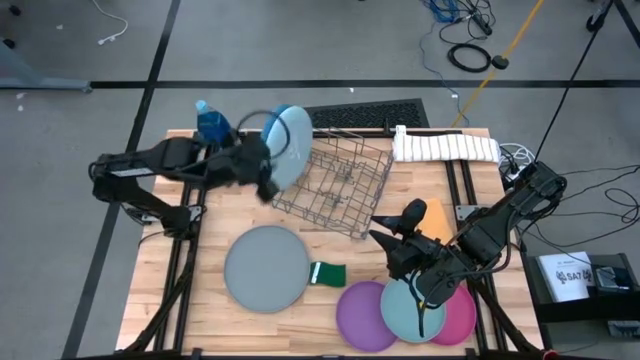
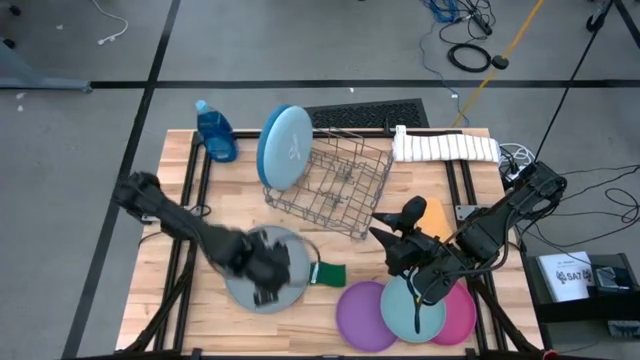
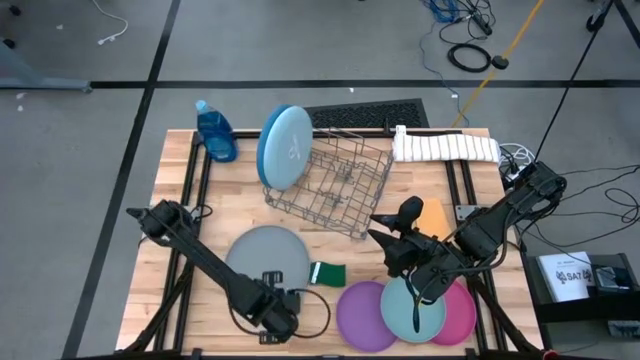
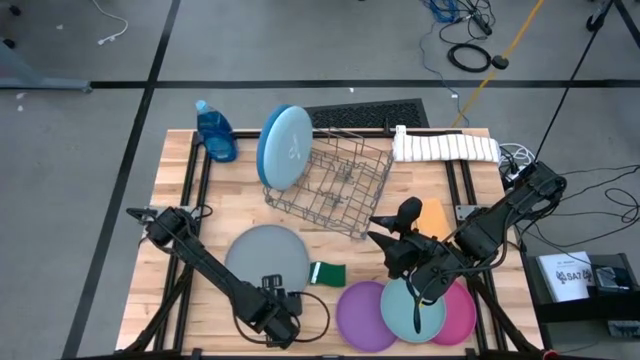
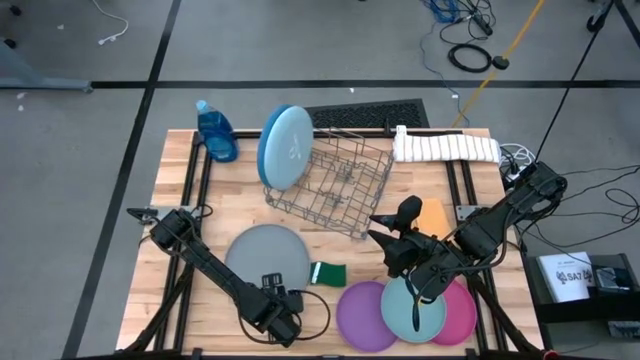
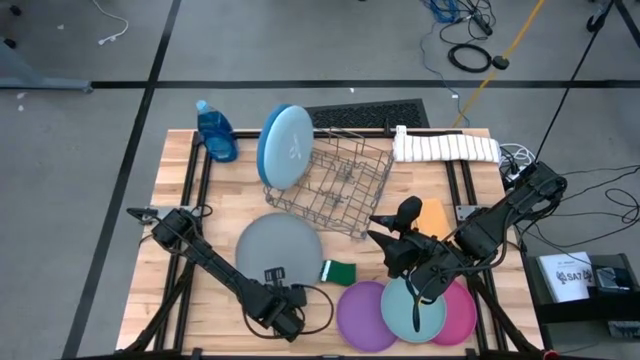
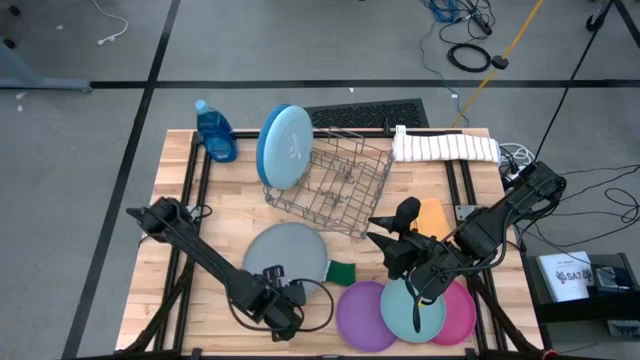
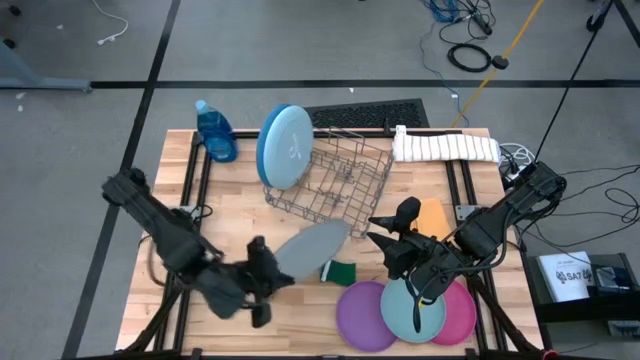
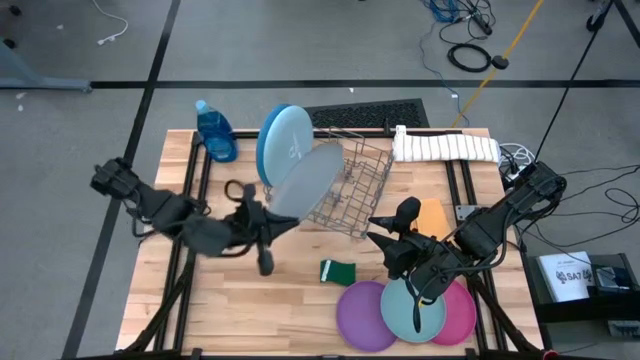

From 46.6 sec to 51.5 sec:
Task: Sort dishes
Put the grey plate in the dish rack

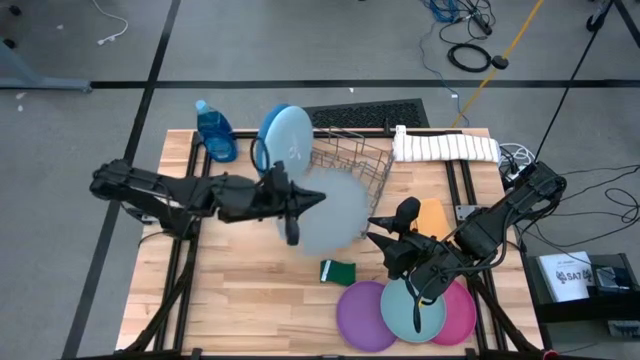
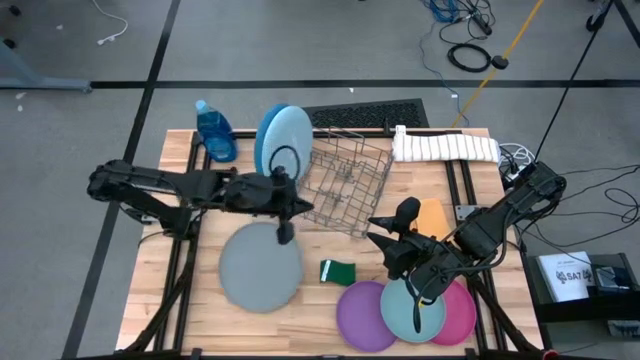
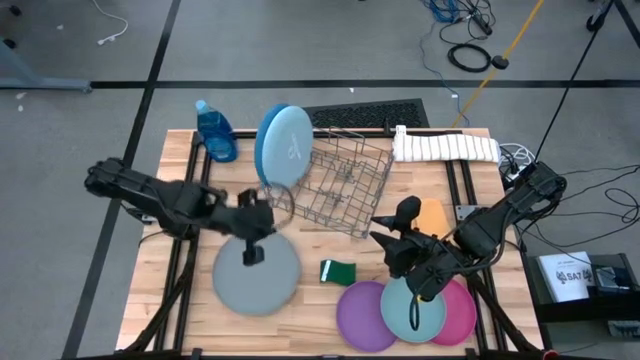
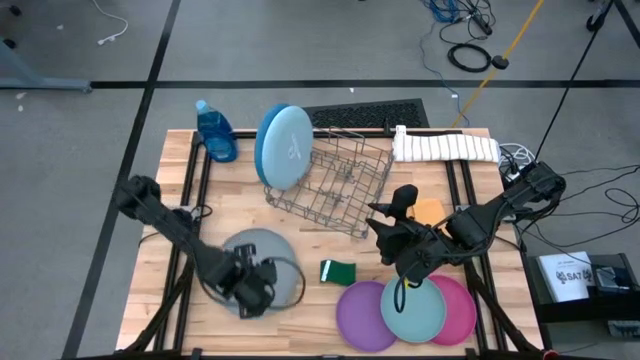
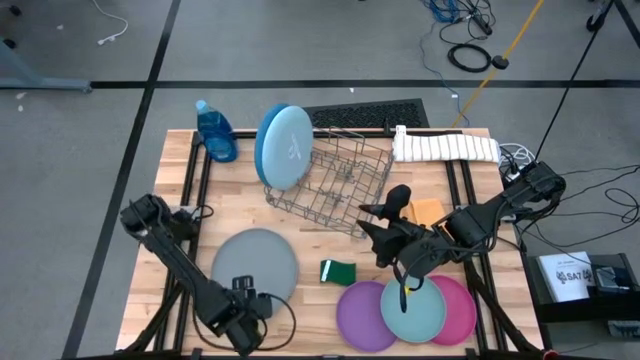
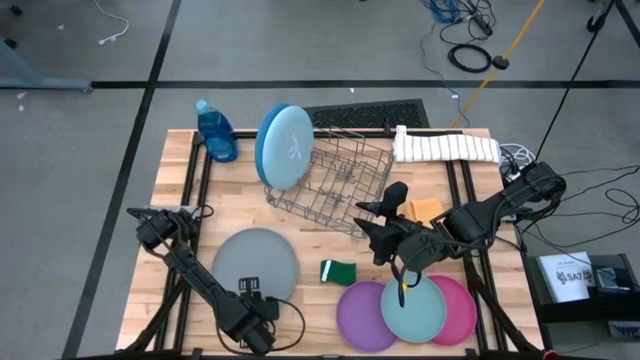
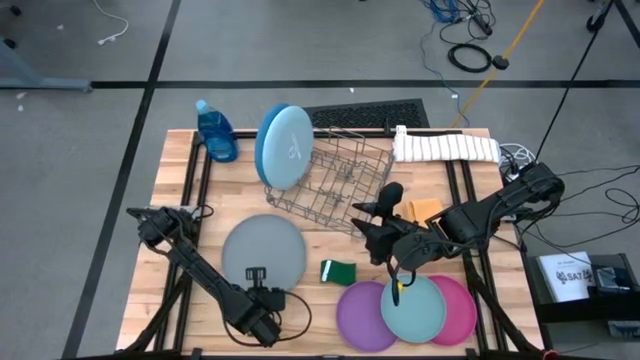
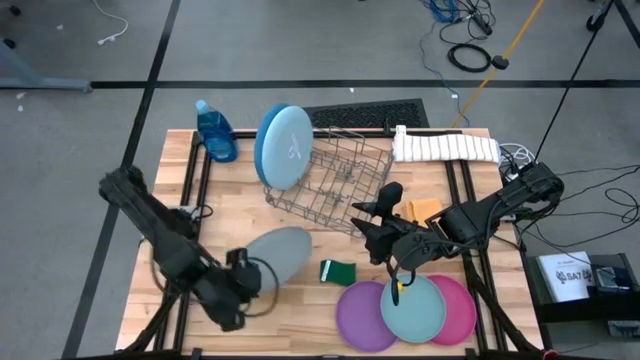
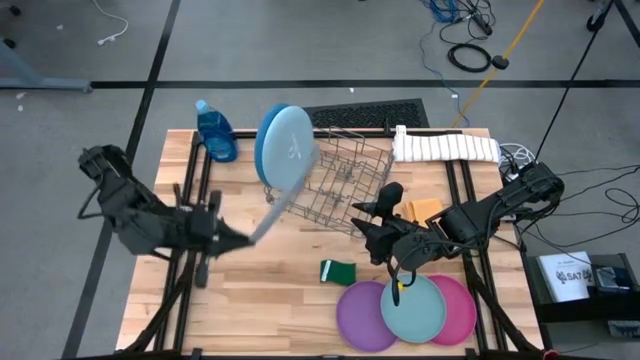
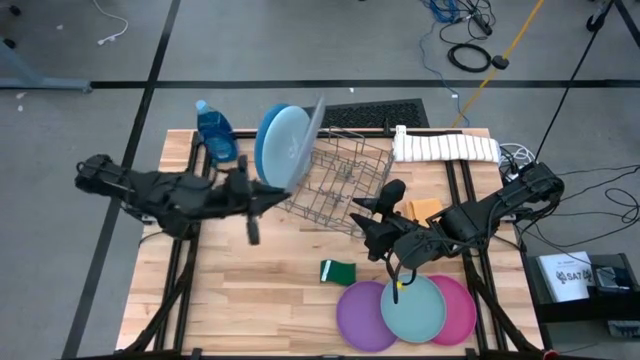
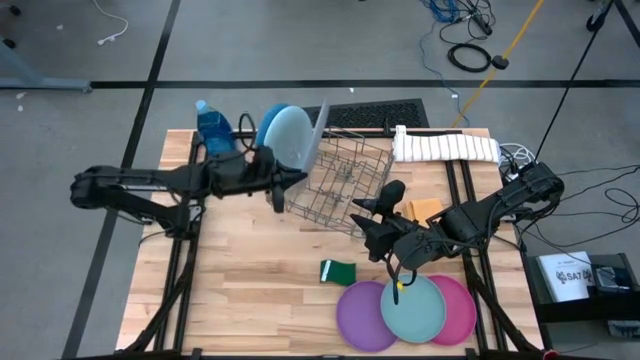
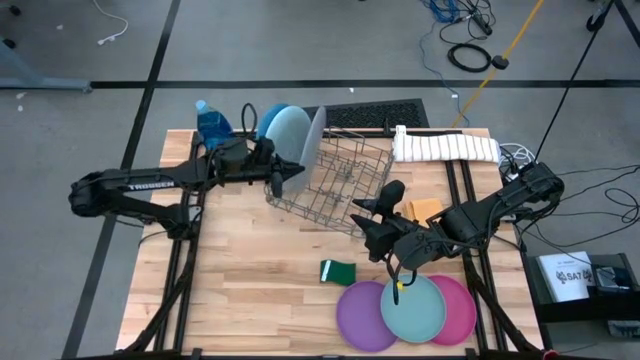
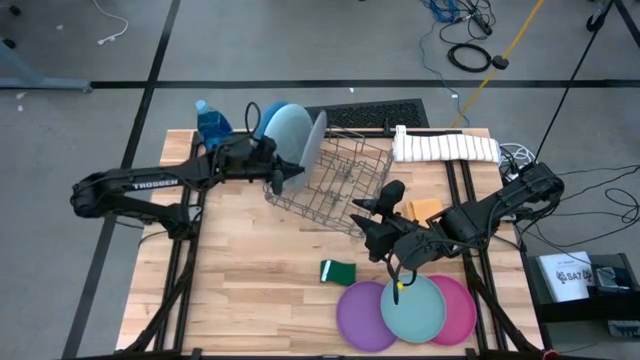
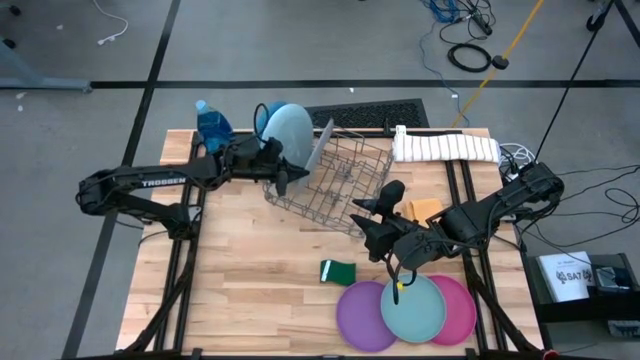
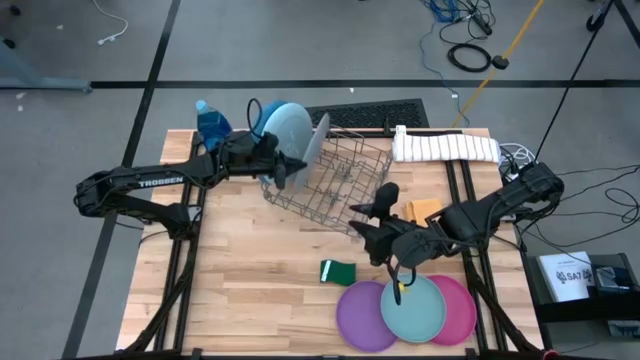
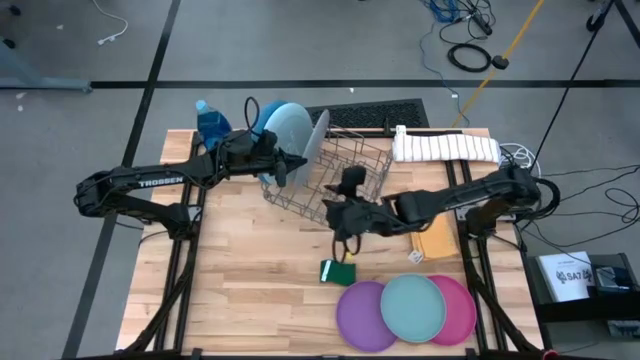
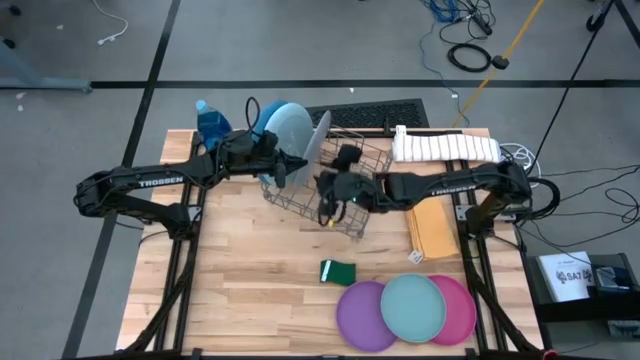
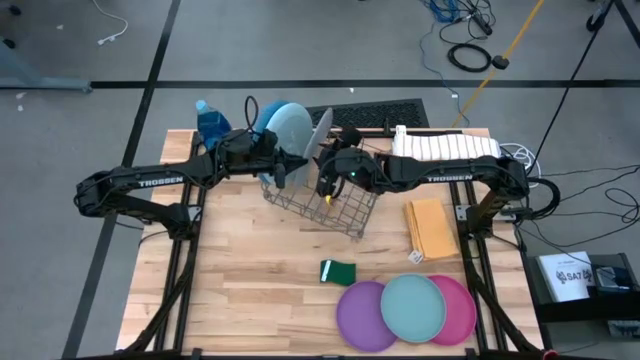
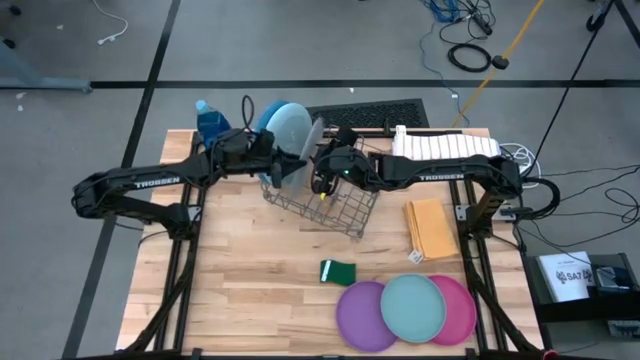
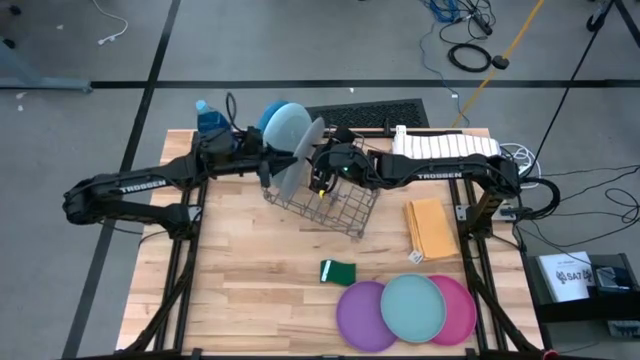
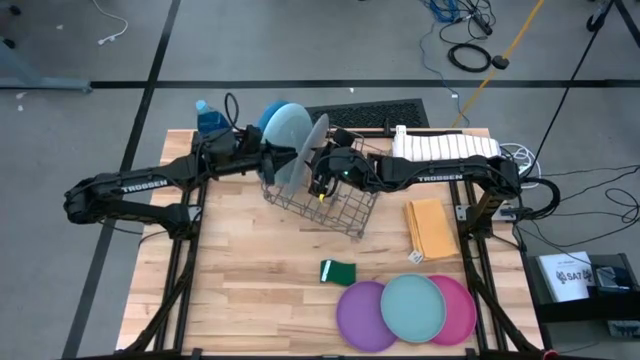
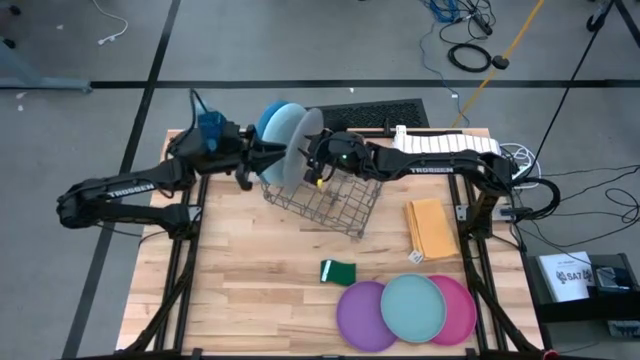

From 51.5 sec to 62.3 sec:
Put the grey plate in the dish rack

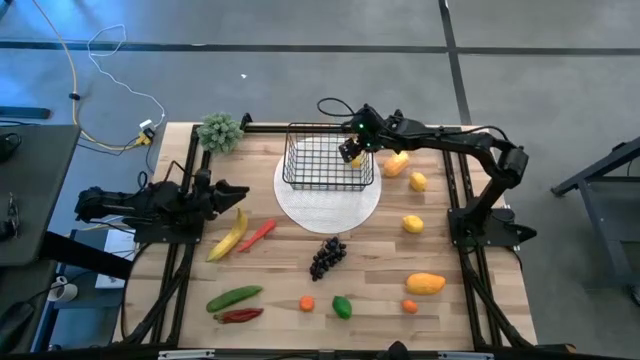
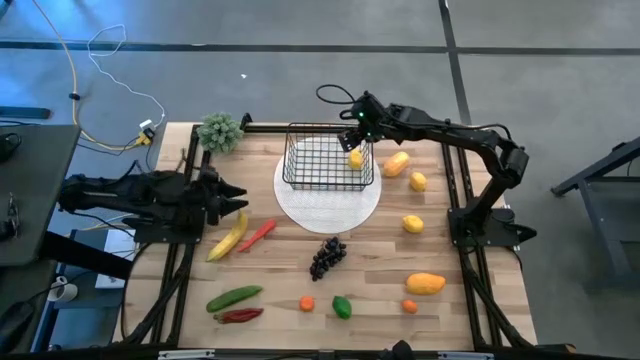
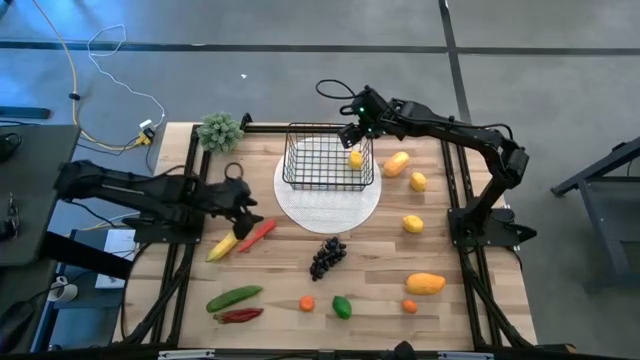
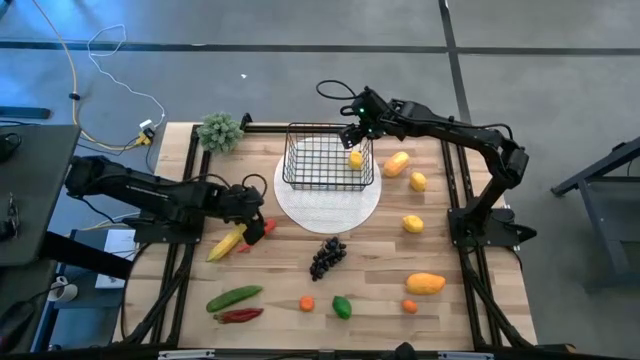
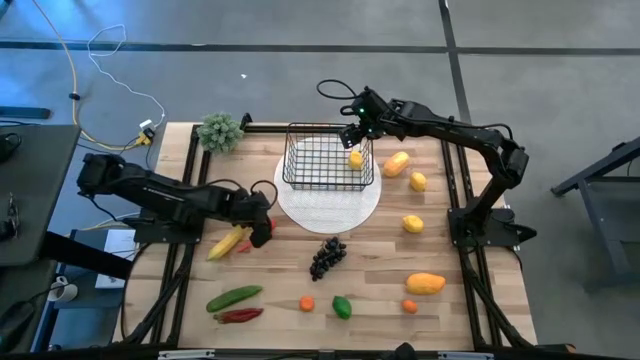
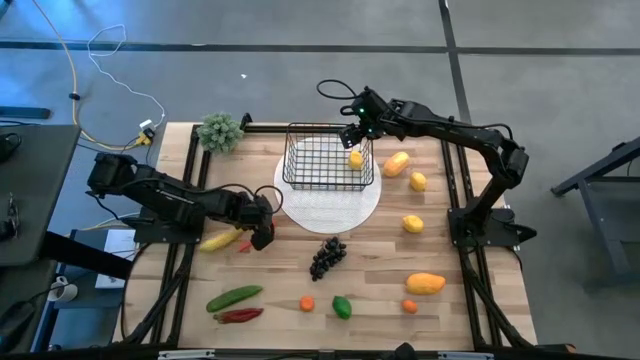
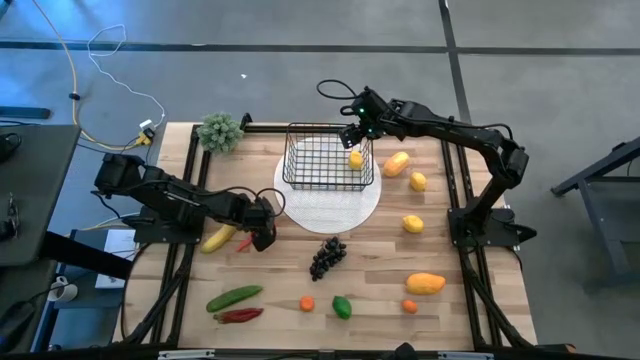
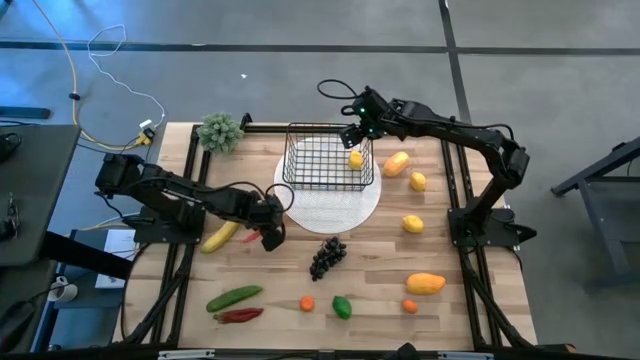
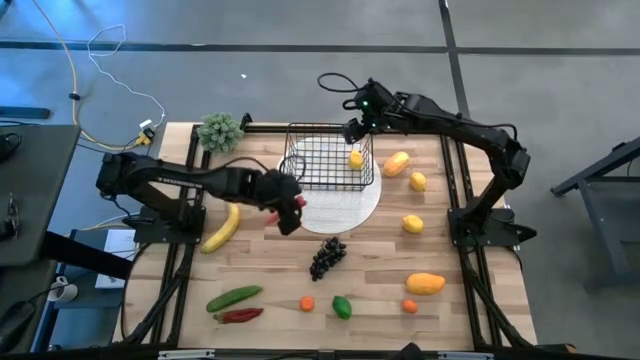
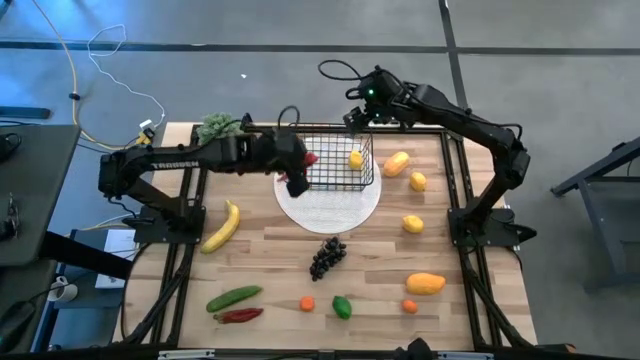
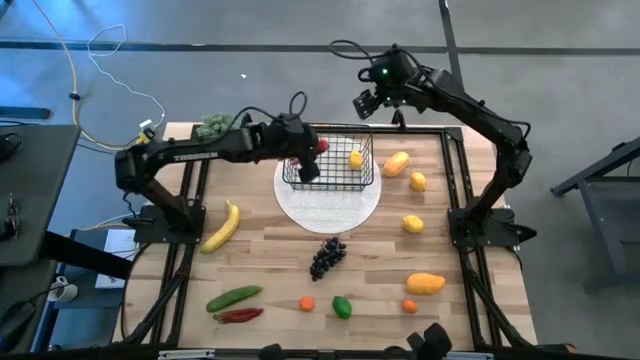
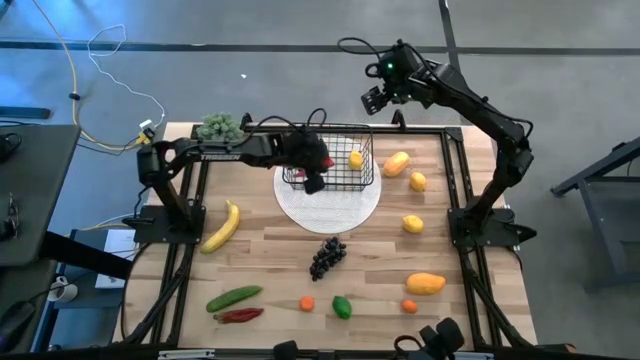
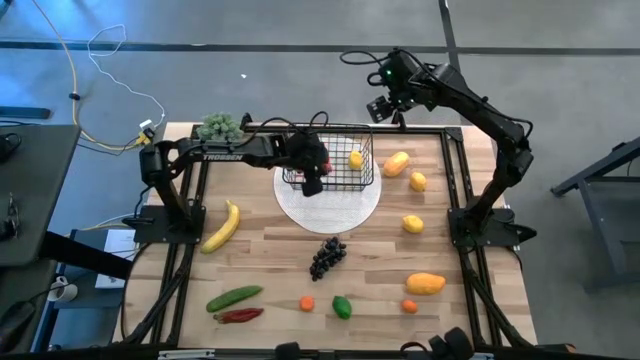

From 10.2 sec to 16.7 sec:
Task: Build produce basket
Put the orange carrot into the black wire basket
